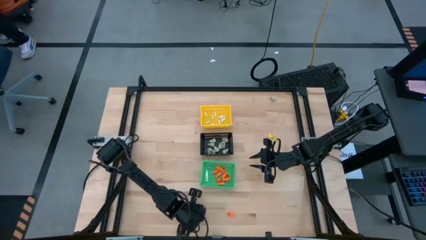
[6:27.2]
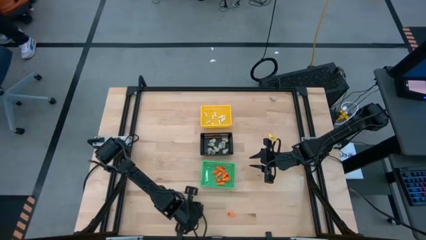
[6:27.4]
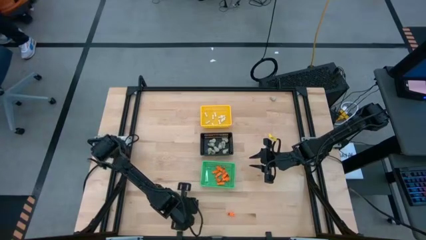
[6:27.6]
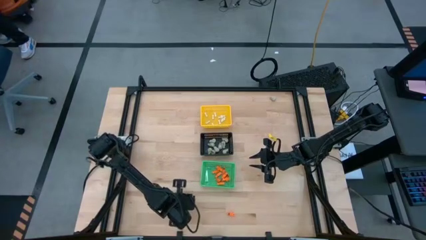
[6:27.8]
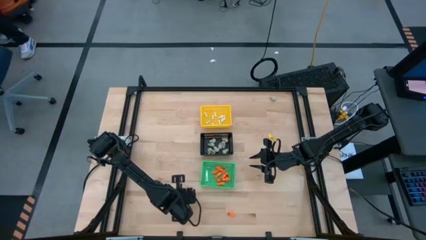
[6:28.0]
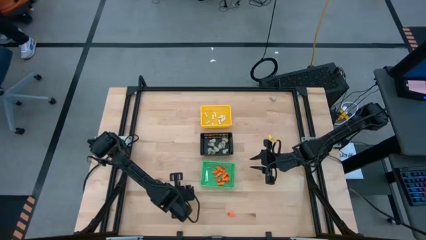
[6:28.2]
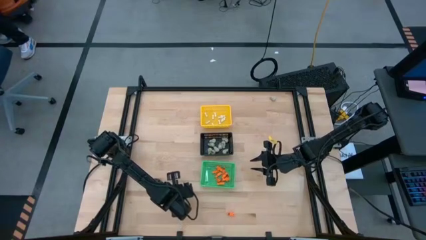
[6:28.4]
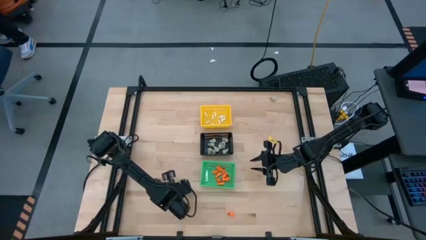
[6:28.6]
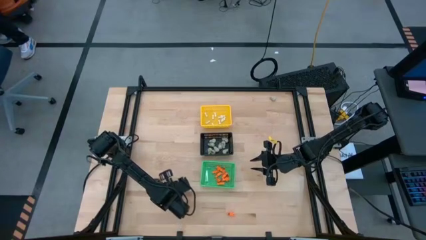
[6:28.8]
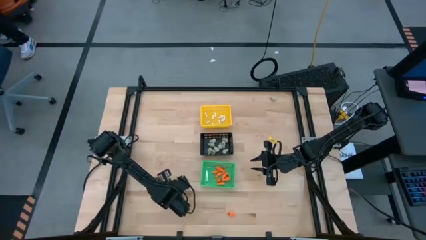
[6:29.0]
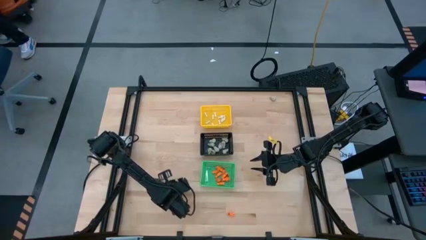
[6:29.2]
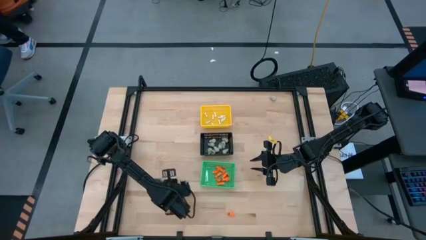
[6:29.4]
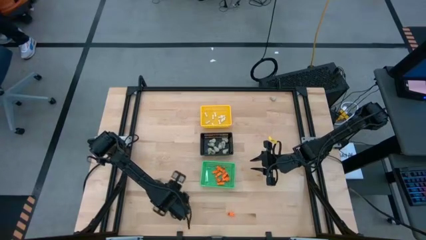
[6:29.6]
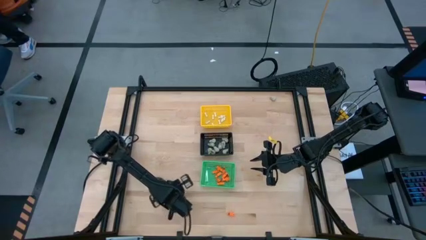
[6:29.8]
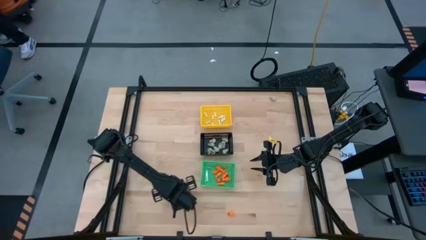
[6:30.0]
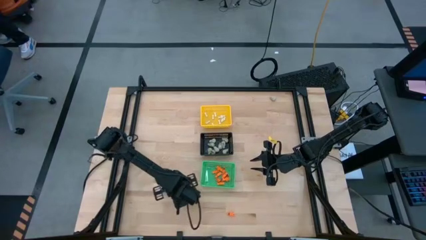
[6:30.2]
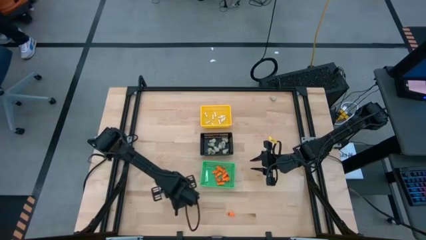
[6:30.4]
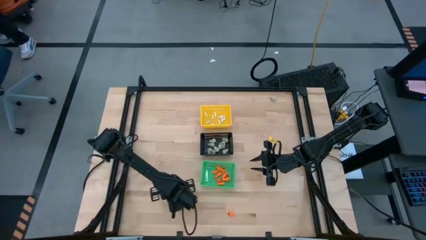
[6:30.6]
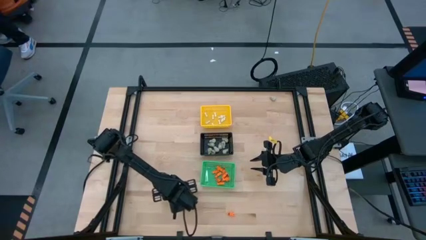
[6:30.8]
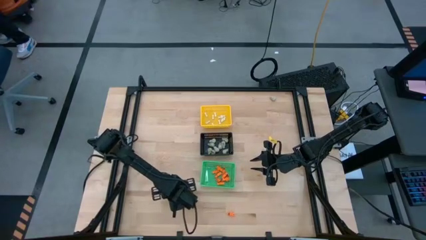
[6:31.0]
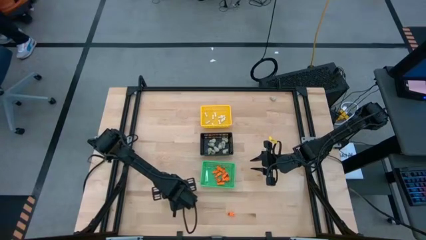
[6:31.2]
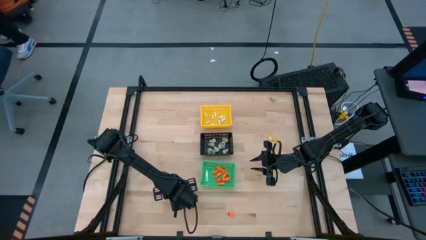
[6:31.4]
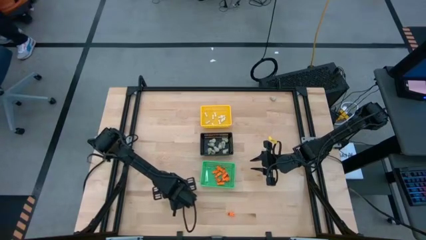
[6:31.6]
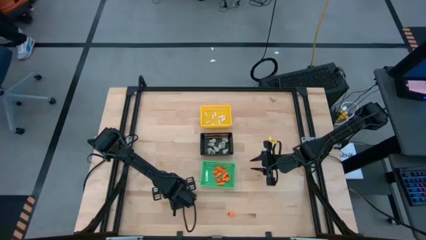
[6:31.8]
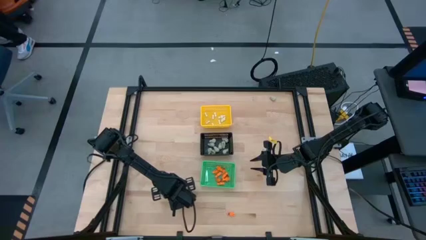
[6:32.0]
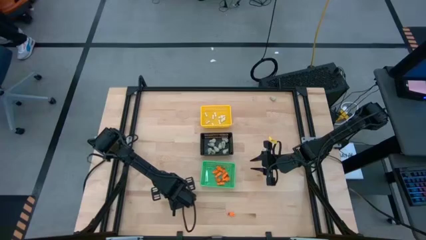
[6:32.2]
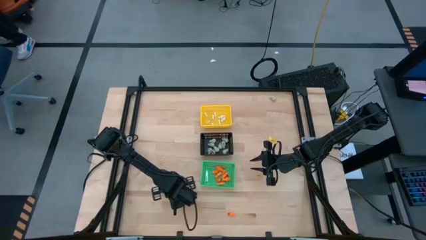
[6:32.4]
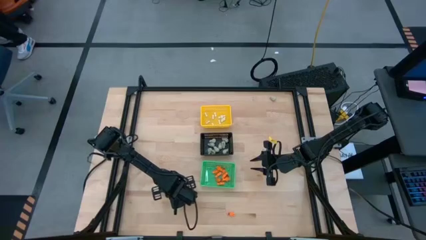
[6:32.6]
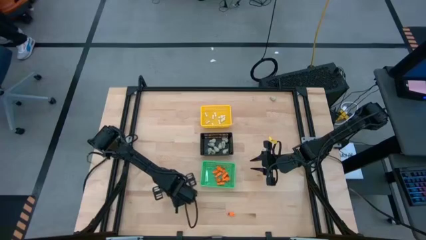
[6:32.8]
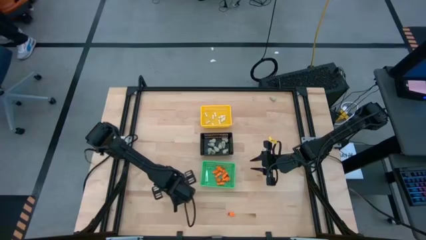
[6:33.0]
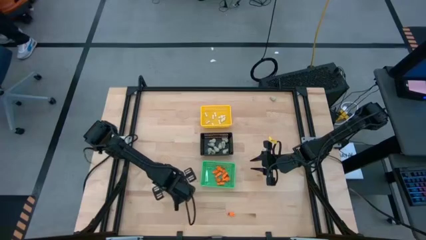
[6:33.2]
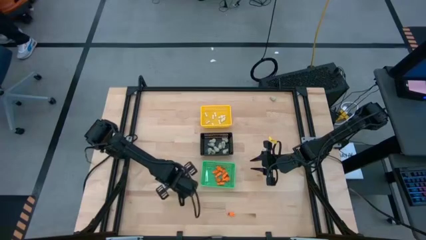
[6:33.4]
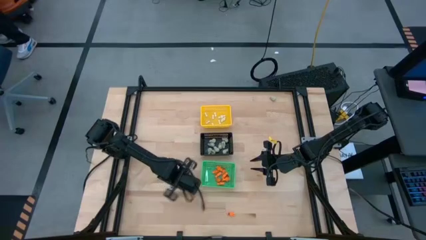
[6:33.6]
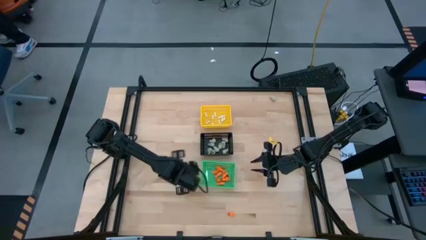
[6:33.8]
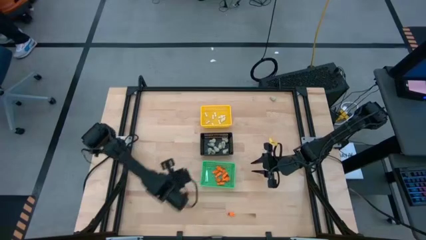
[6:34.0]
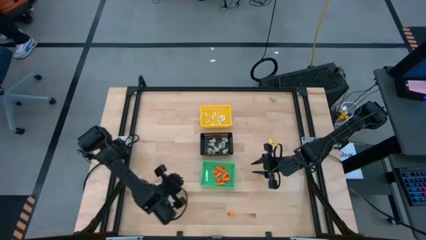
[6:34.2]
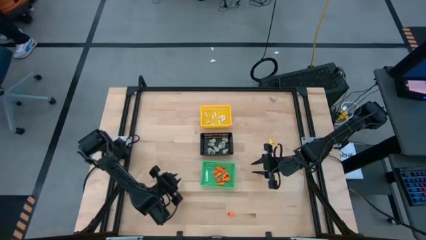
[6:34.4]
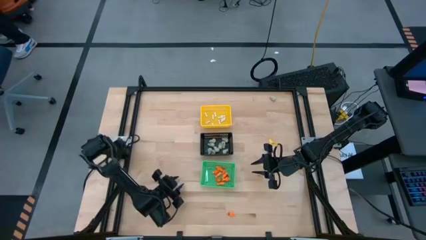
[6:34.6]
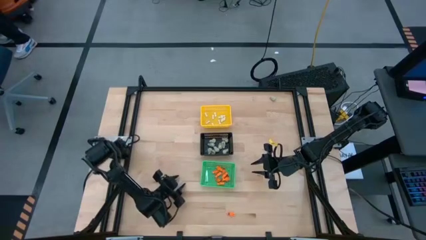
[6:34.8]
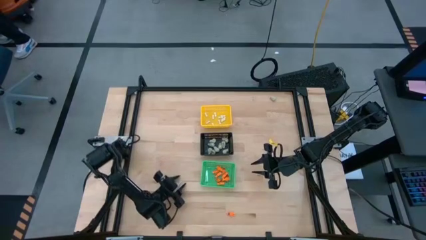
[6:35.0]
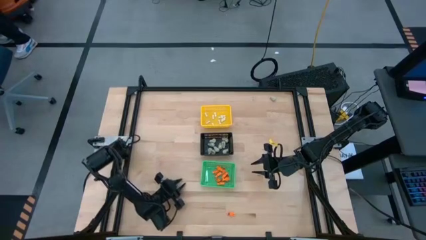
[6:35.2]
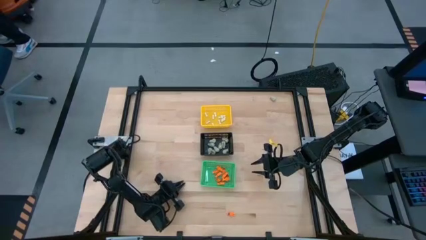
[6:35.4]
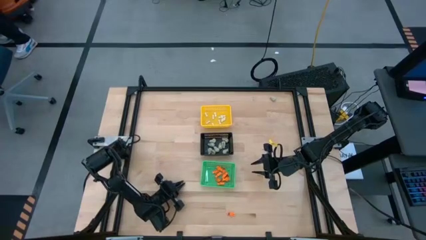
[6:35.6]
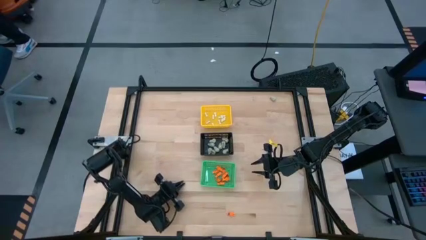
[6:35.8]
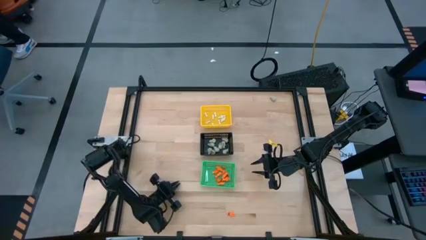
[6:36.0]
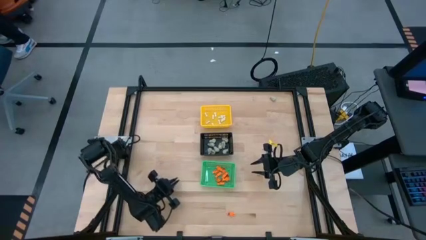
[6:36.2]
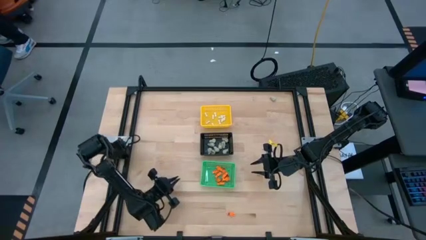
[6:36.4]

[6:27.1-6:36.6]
Task: Sort Halloween decoration
Put the white bone toy into the yellow basket

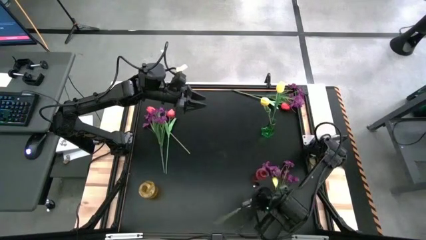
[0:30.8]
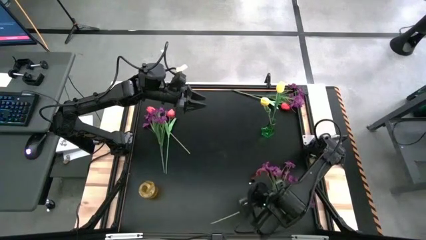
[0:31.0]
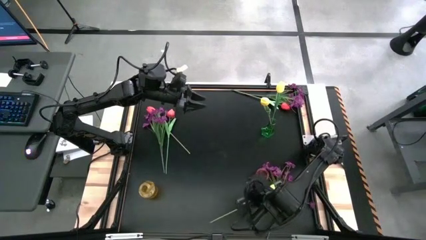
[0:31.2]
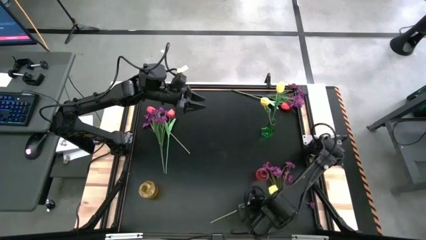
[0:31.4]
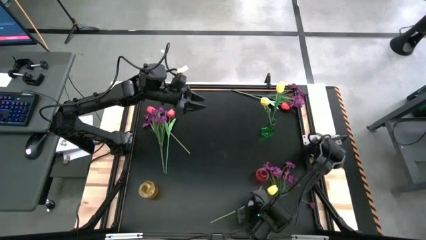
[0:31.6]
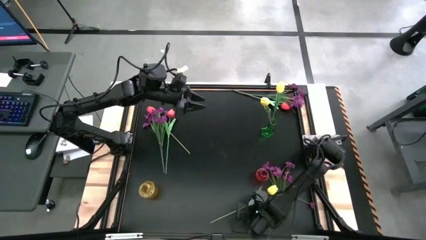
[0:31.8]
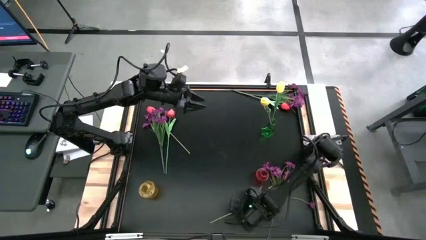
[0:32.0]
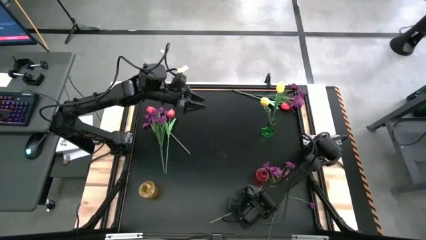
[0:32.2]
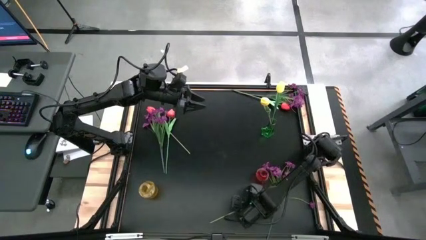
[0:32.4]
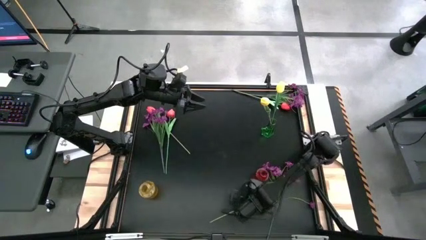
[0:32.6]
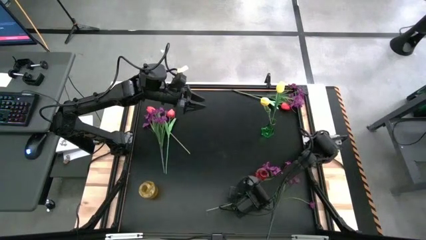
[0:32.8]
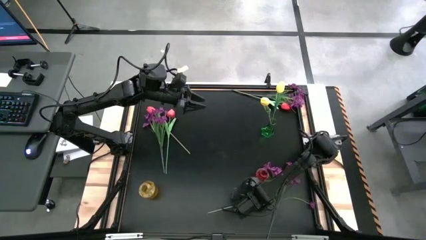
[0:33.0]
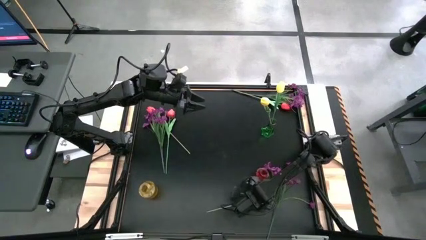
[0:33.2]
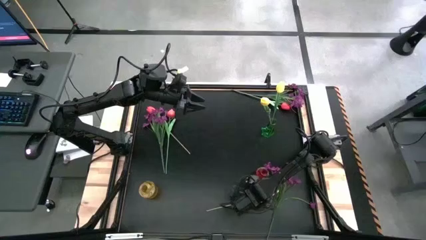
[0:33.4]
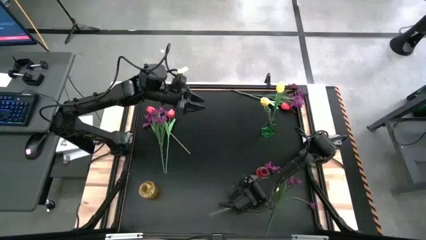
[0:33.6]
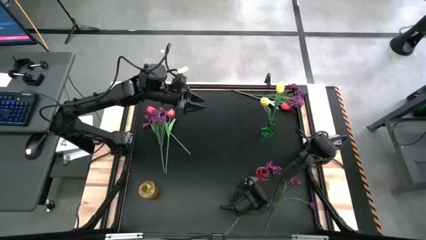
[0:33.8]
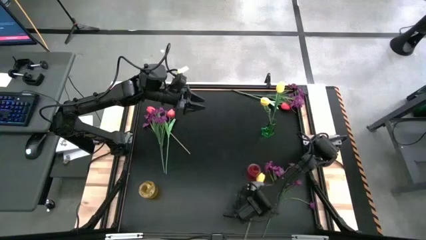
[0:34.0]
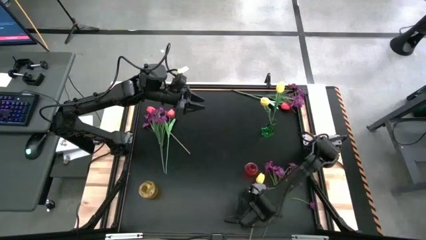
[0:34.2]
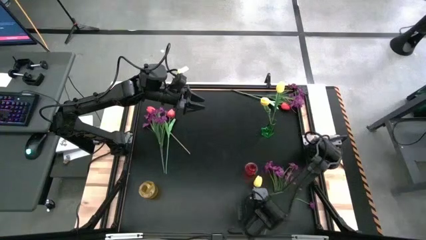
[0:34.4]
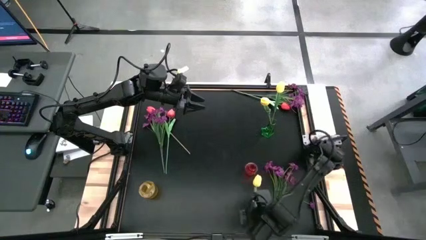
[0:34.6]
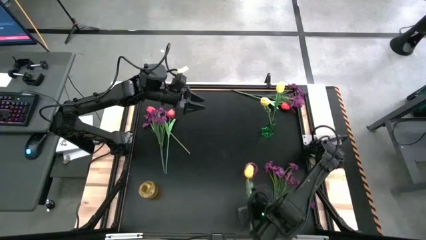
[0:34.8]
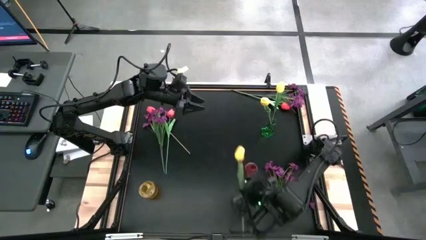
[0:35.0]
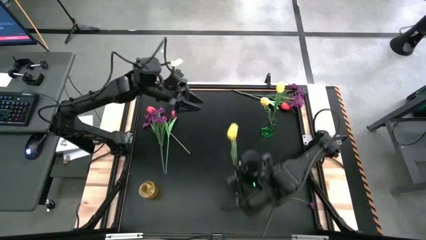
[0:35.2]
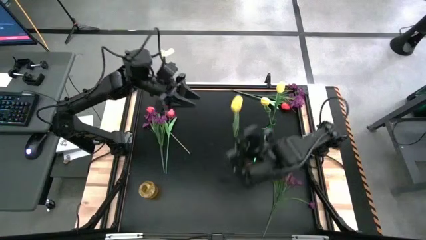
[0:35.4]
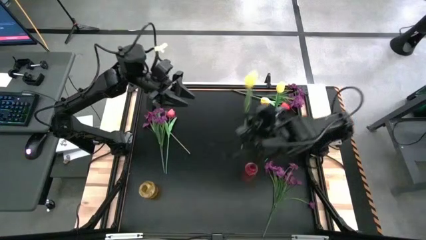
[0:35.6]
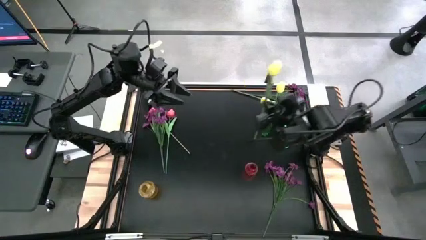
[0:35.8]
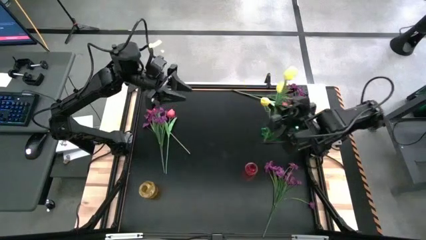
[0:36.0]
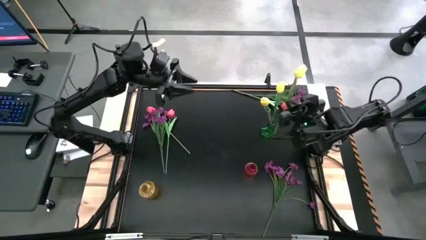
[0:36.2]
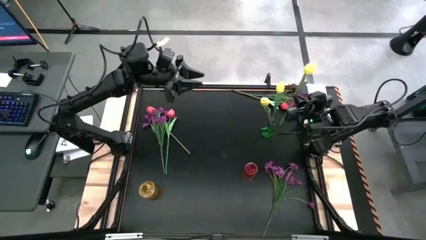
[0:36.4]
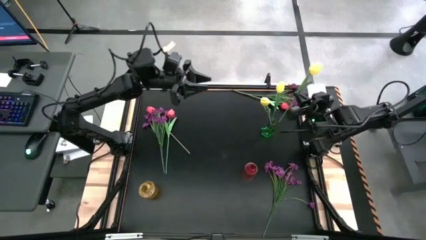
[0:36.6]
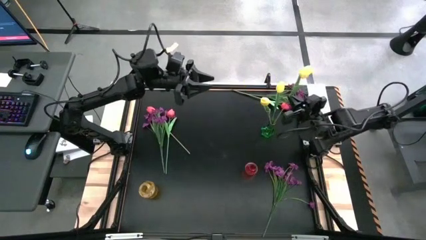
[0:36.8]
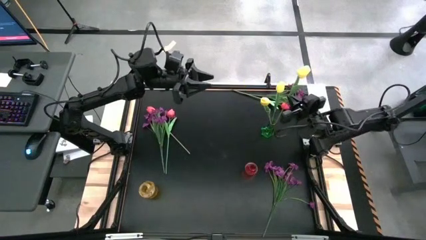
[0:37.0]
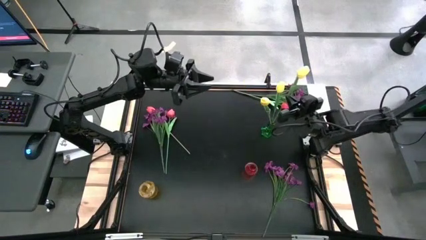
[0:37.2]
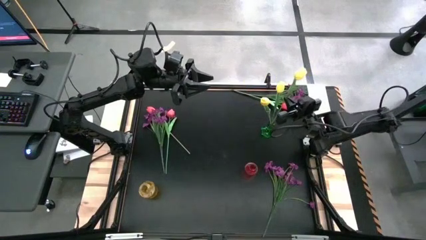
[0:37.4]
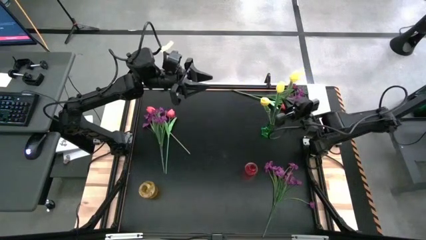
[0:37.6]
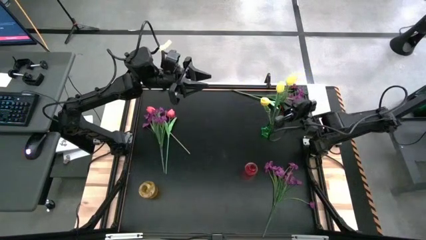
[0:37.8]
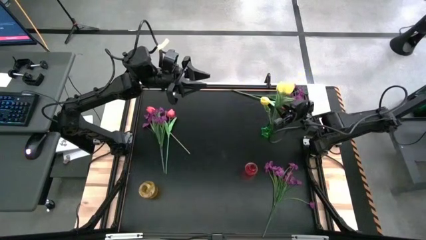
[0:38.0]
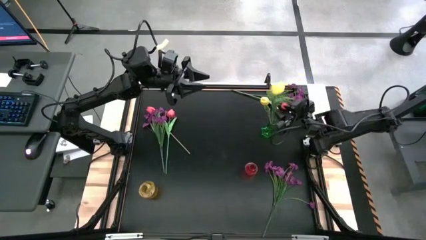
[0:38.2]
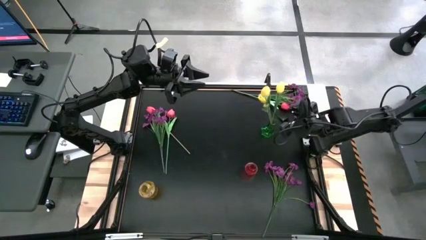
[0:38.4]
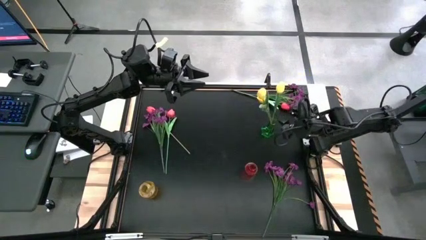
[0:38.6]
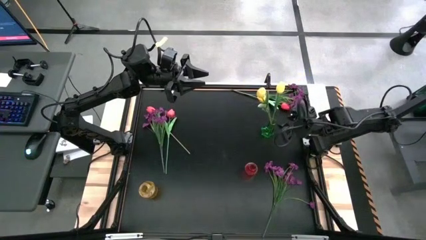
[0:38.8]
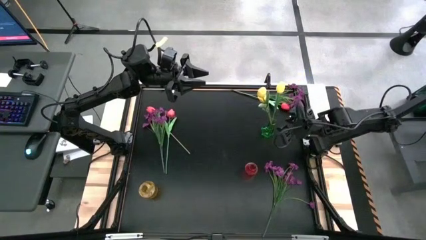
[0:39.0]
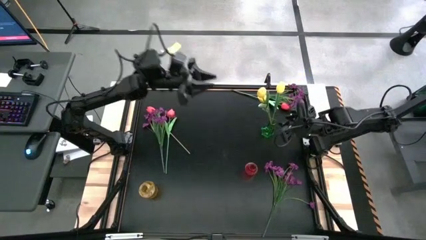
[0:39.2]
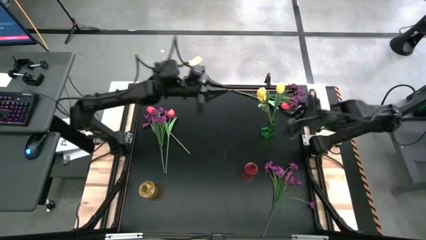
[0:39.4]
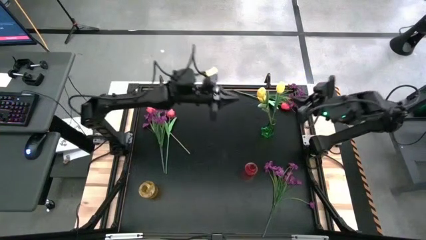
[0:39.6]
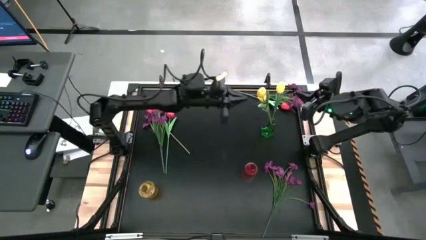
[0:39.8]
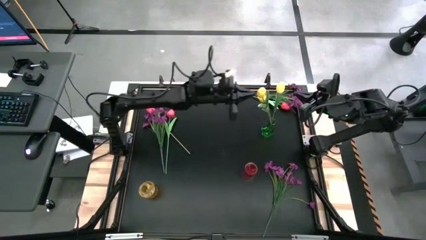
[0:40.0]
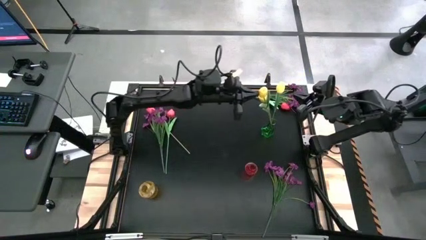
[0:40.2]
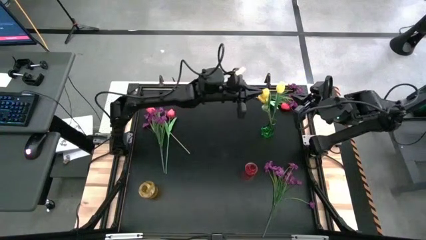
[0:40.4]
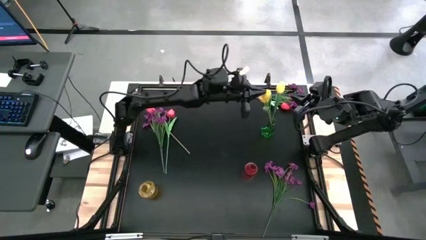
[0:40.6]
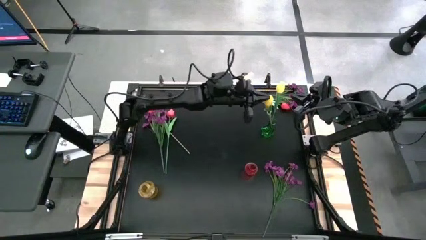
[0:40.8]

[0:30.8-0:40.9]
Task: Sort flowers into vase by color
Put the yellow tulip into the green flower vase
